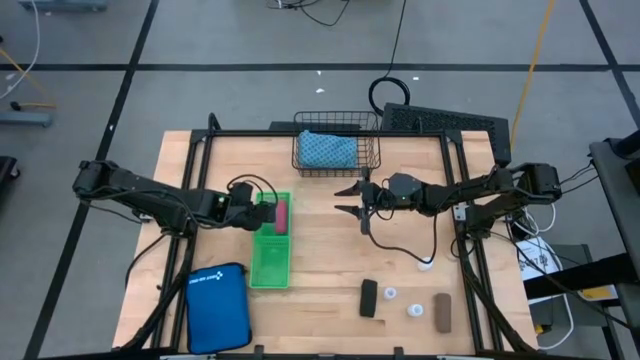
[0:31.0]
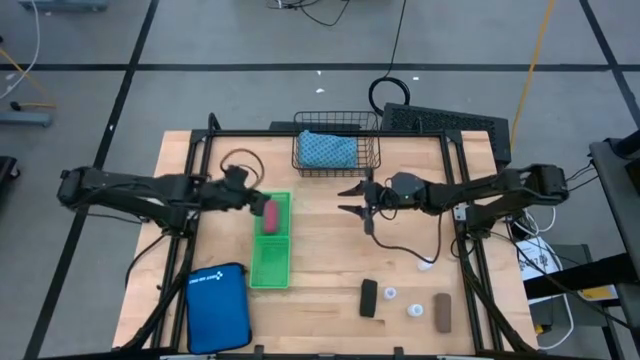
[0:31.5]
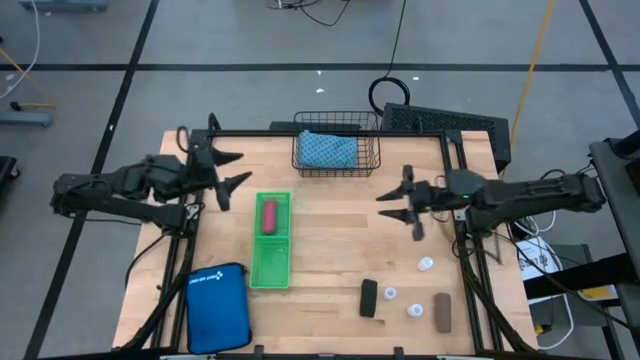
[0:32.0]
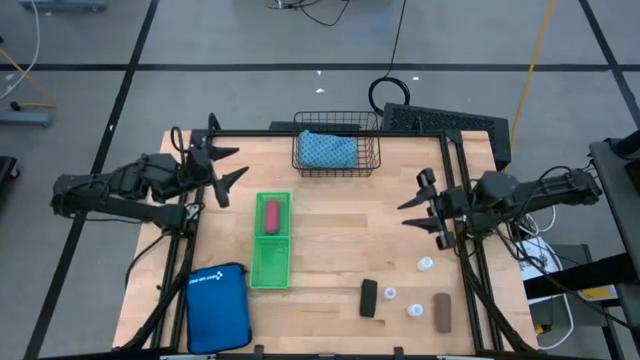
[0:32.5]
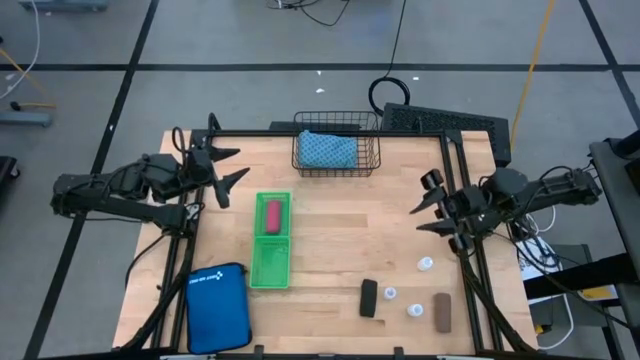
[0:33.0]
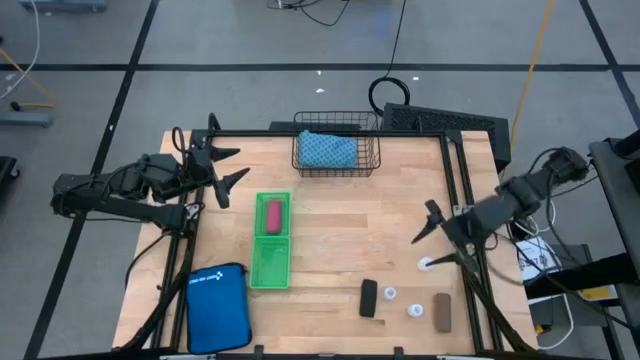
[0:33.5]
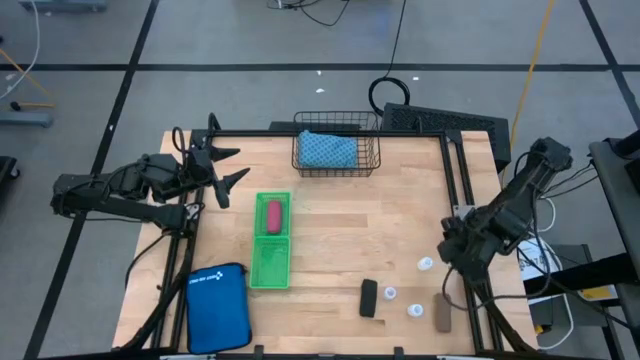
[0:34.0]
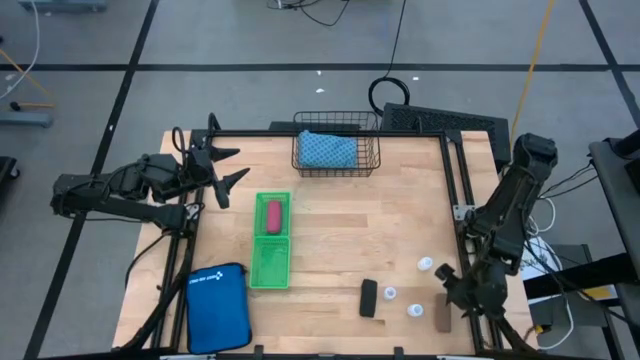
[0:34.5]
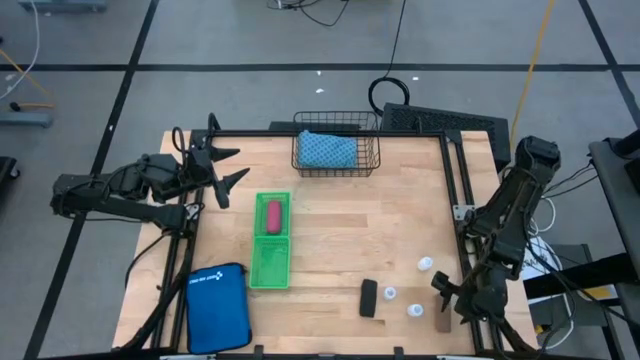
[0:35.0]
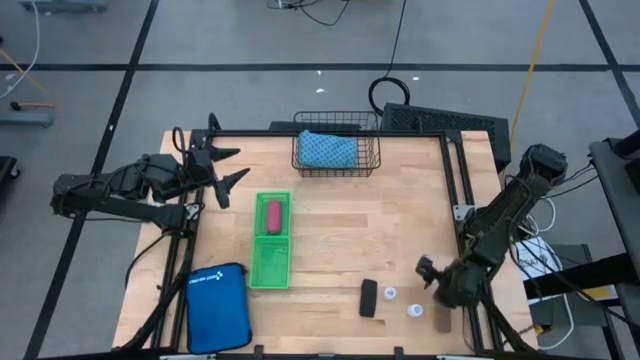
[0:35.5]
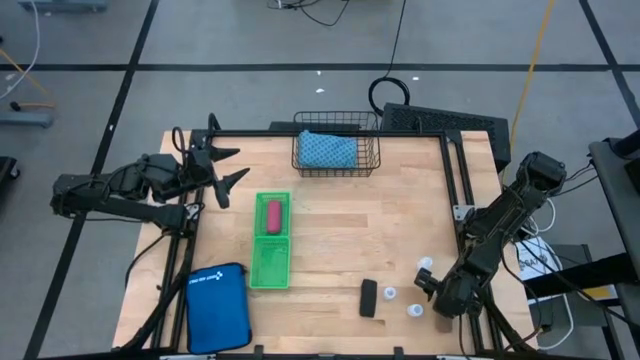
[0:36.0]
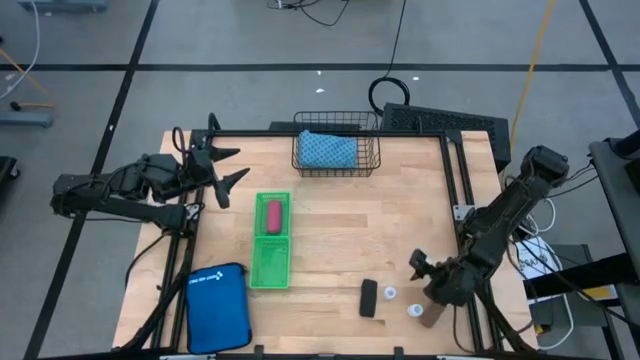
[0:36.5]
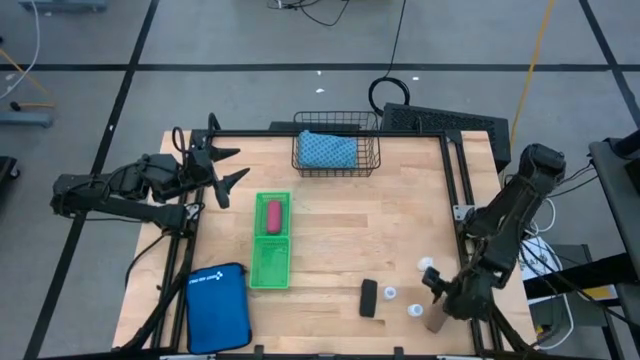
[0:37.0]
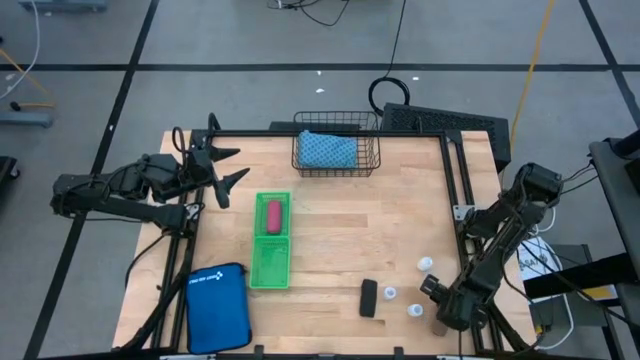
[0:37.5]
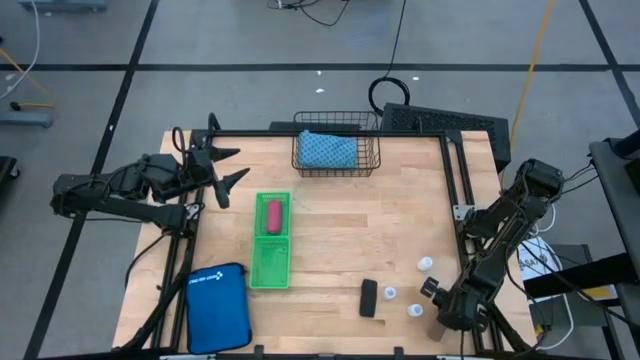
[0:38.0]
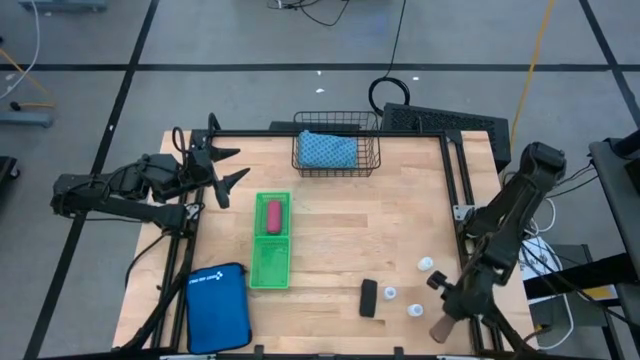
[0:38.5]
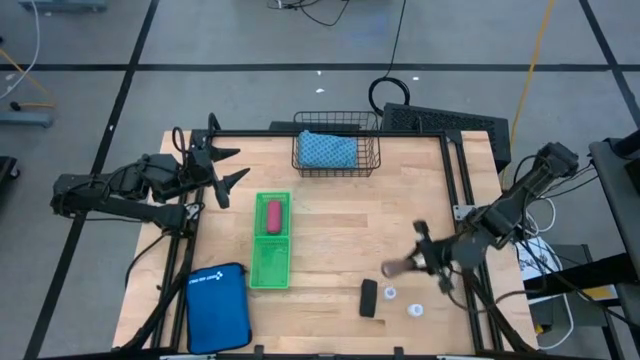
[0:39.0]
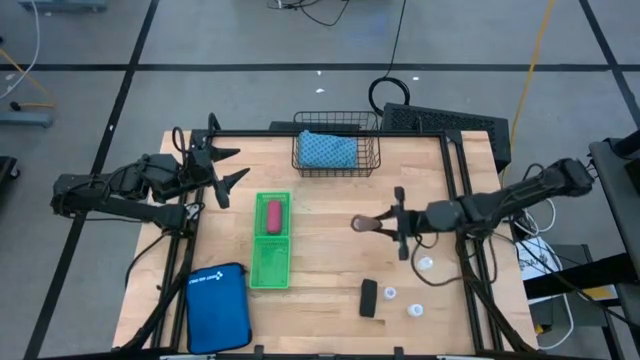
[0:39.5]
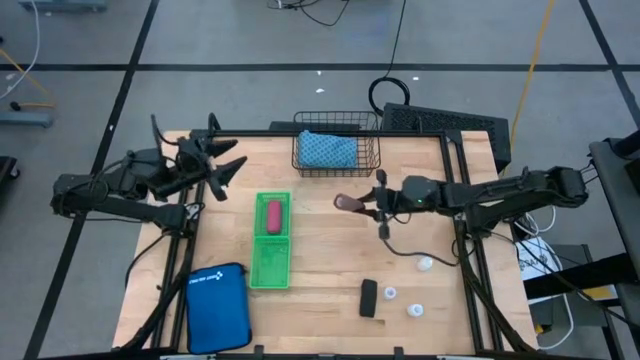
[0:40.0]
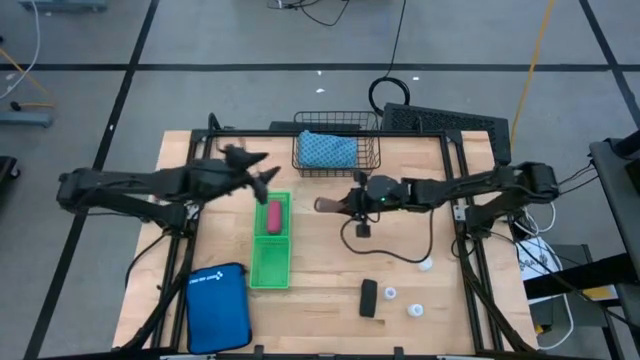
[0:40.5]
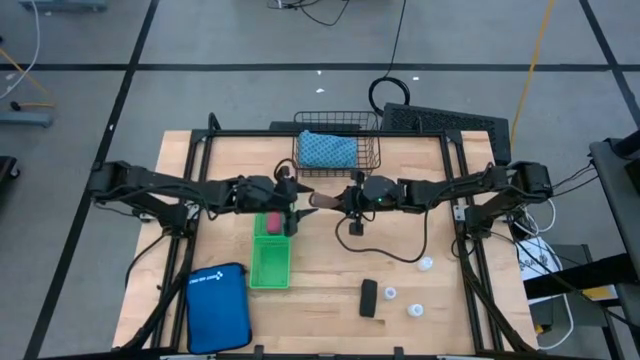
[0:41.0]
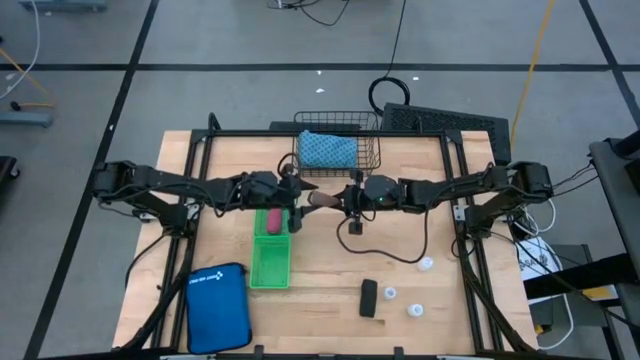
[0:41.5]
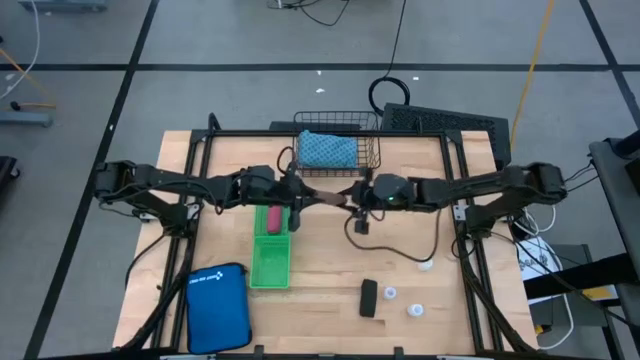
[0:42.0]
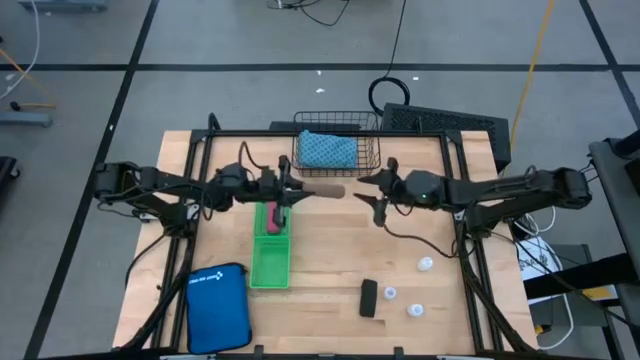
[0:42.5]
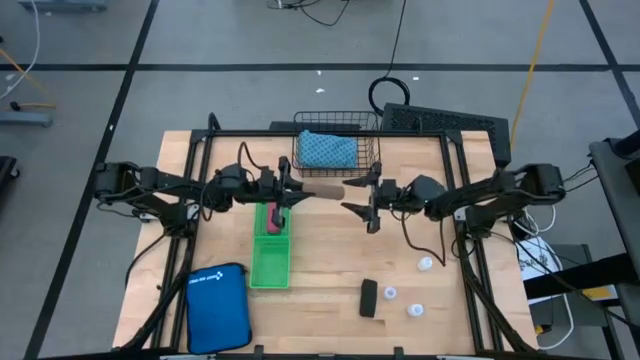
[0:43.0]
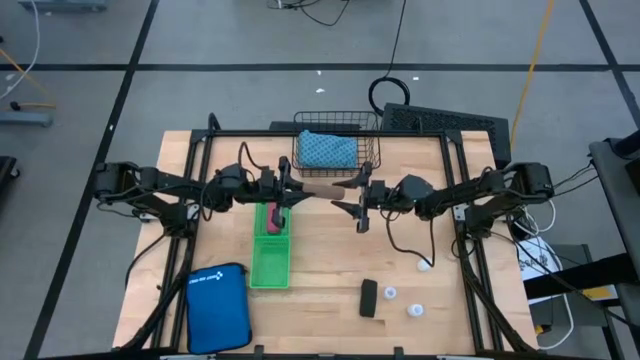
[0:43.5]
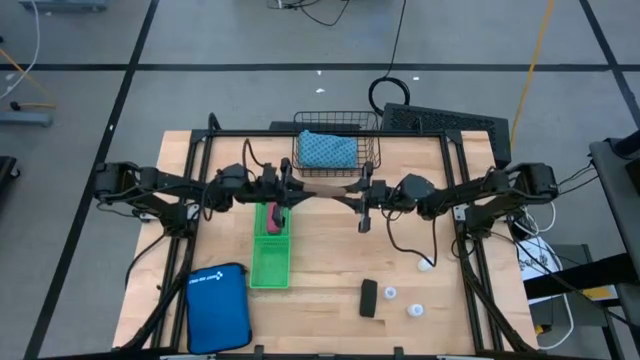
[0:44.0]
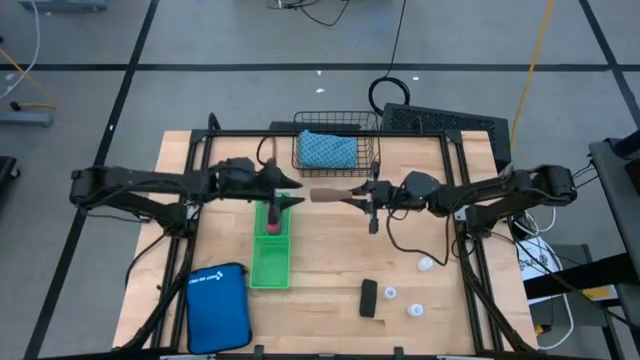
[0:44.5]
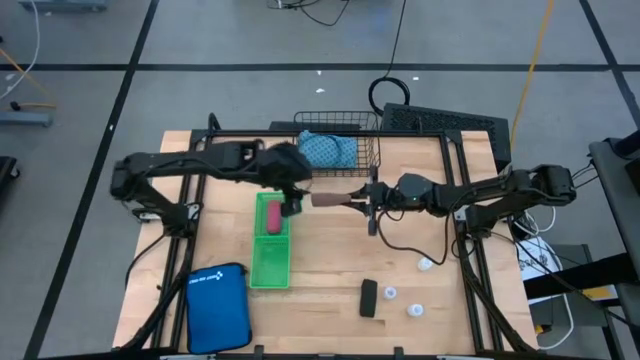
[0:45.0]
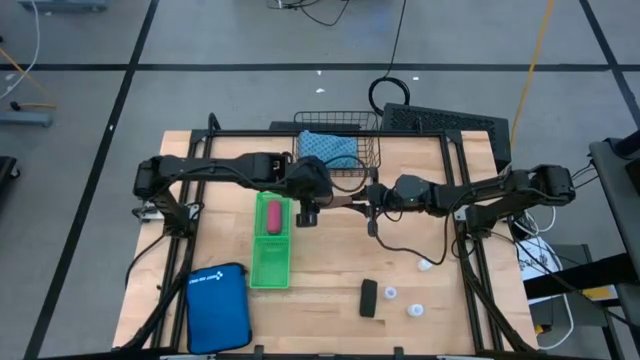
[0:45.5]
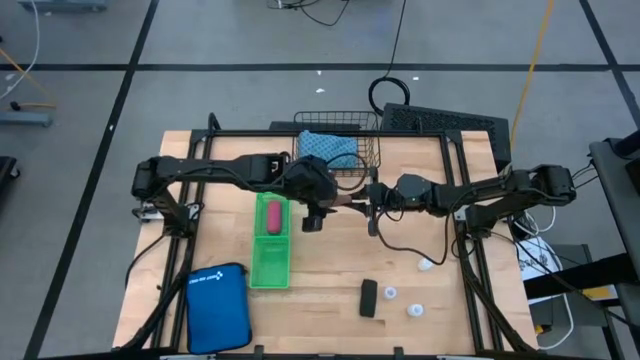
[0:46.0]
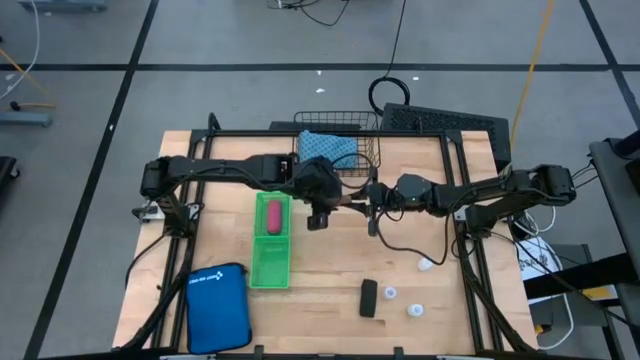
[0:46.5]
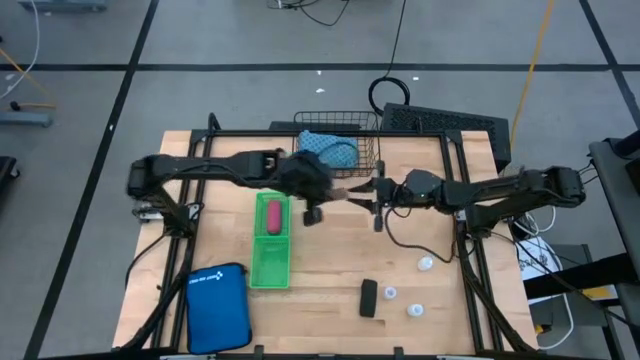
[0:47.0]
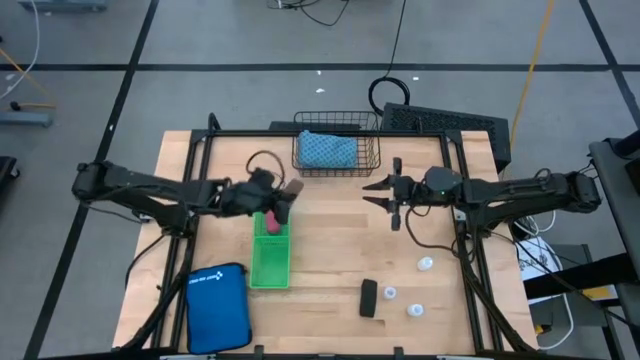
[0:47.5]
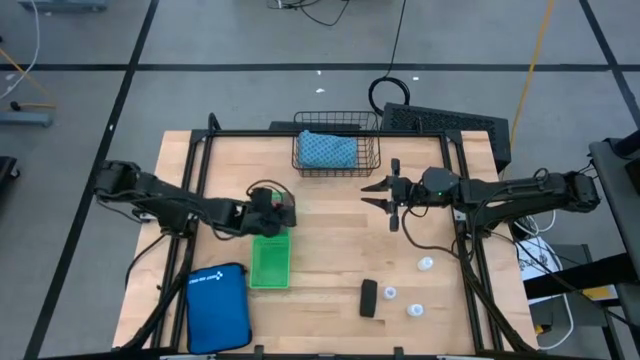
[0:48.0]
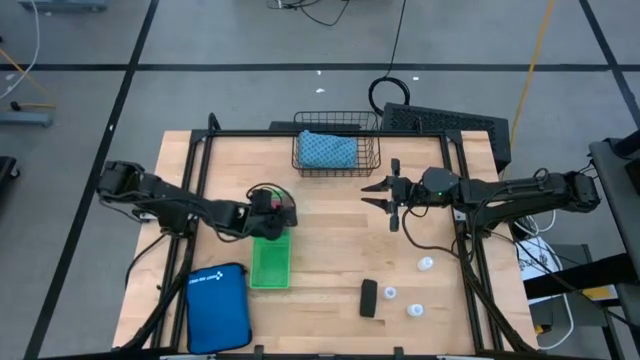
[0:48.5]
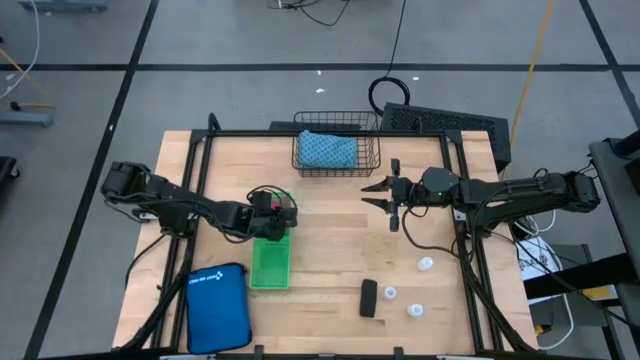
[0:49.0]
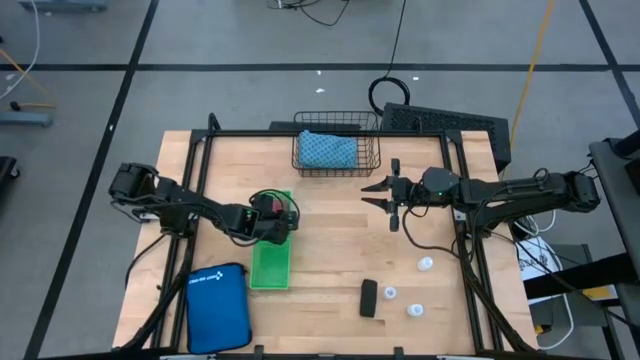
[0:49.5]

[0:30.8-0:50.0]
Task: Pick & Place Medicine items
Put the brown bandage into the top green bin

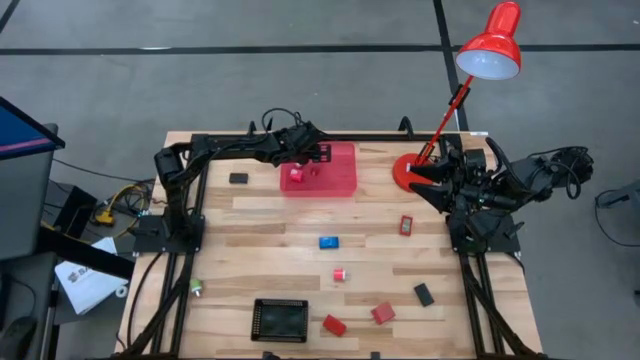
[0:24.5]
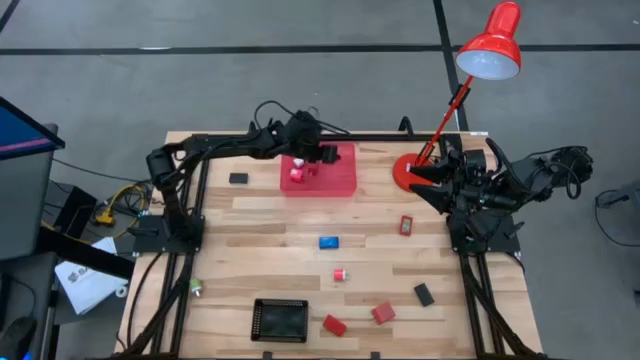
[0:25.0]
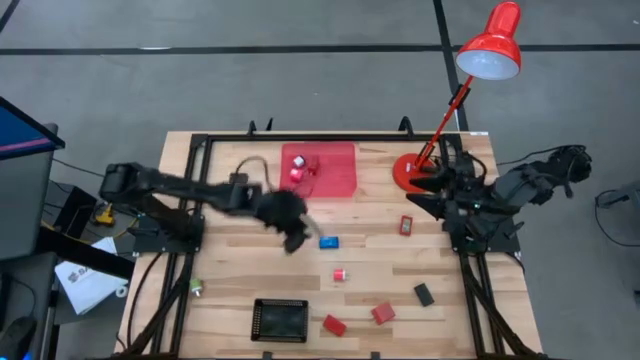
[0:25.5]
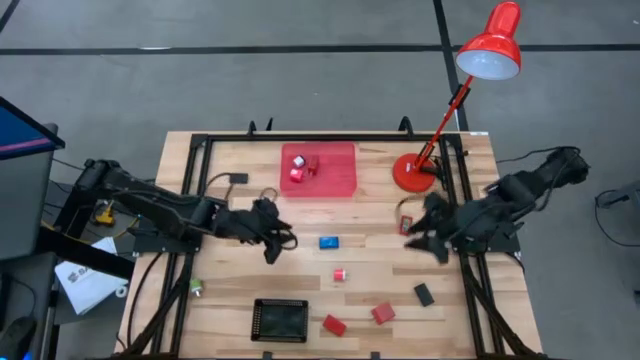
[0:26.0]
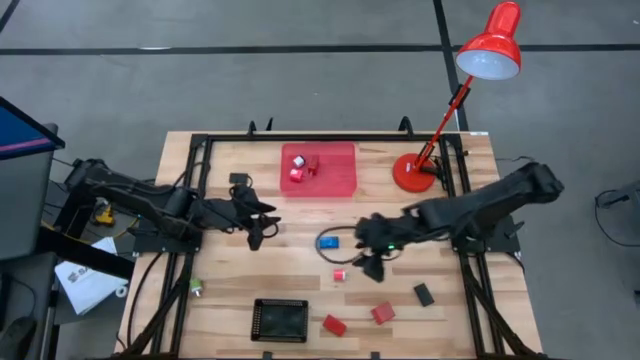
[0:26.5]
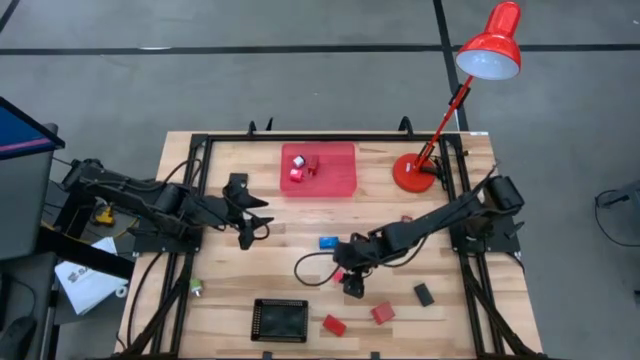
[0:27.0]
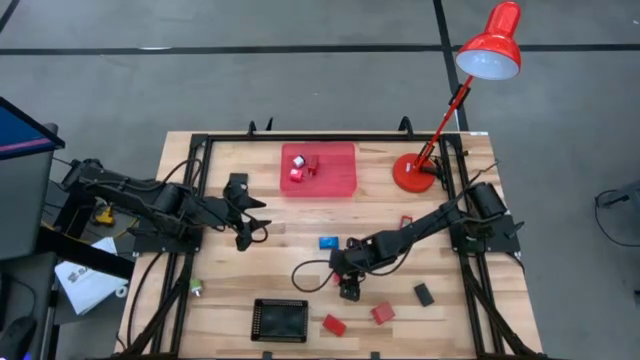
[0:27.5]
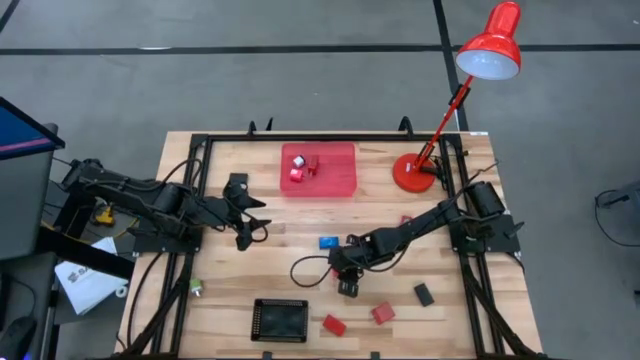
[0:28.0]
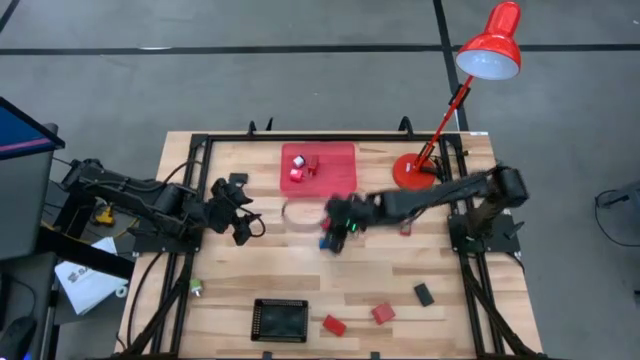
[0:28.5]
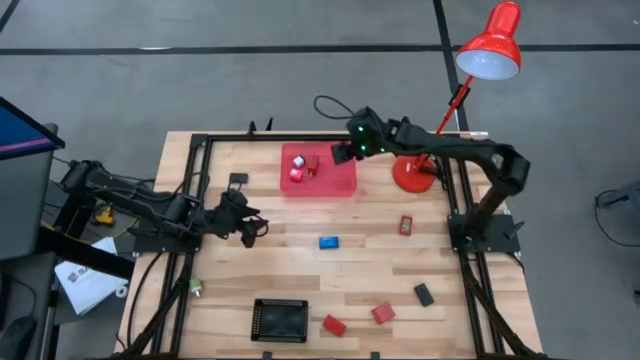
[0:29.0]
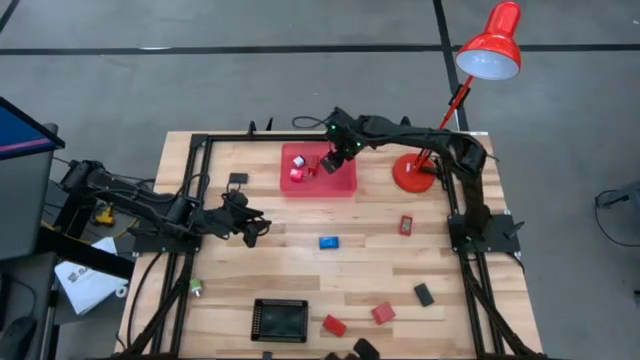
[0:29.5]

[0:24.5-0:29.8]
Task: Pick & Place Office items
Put the pink and white charger adapter into the pink bin
